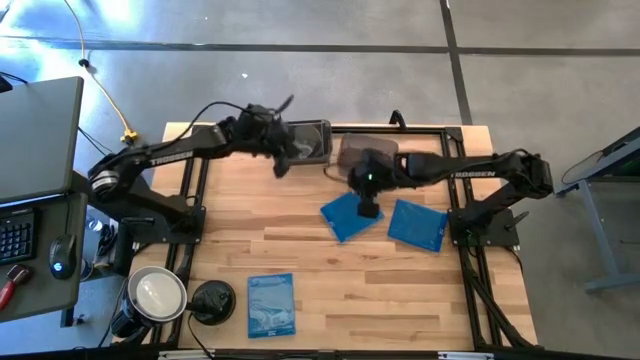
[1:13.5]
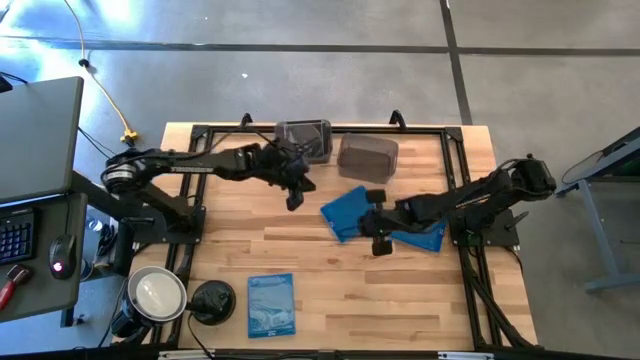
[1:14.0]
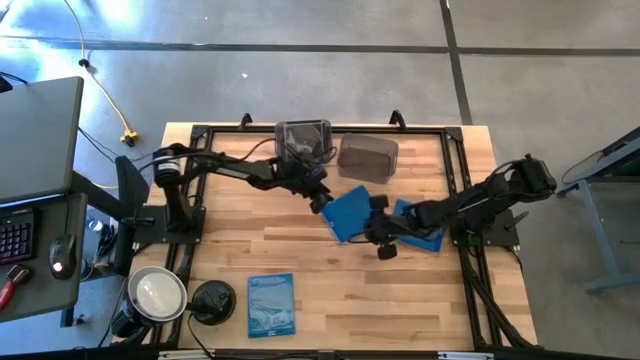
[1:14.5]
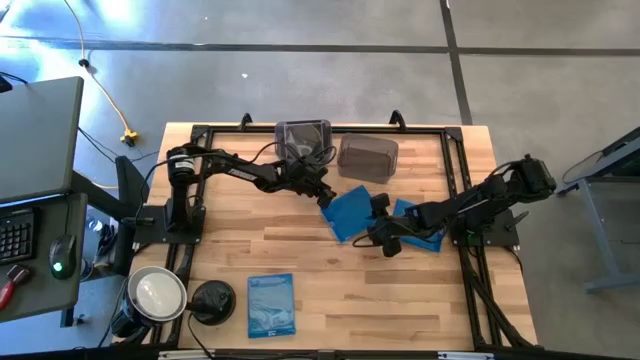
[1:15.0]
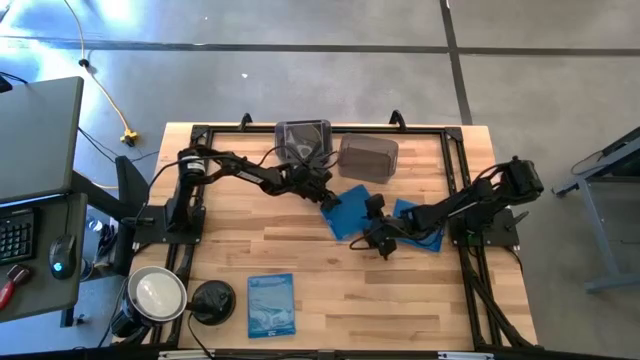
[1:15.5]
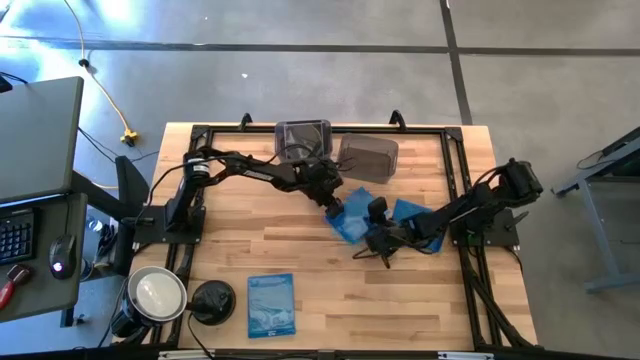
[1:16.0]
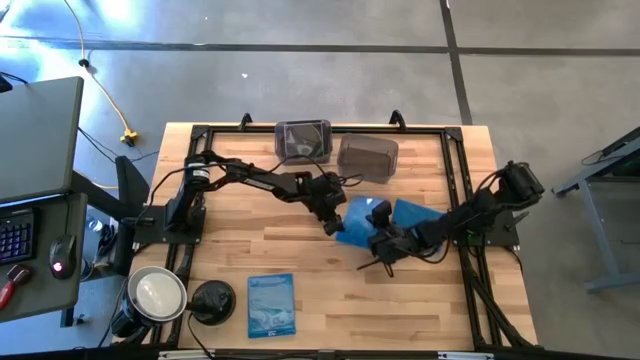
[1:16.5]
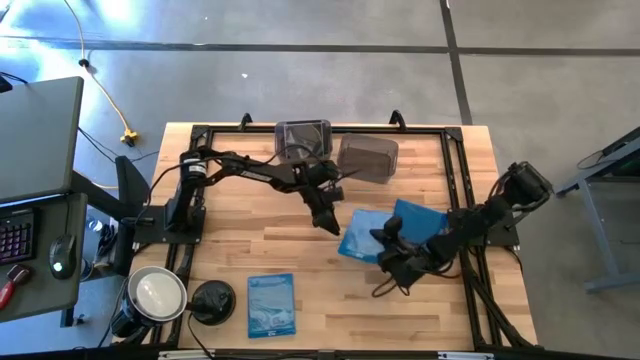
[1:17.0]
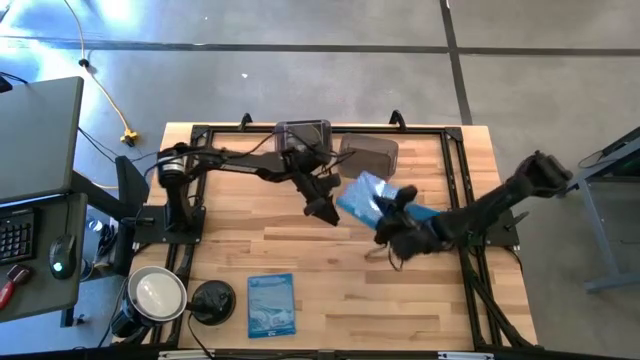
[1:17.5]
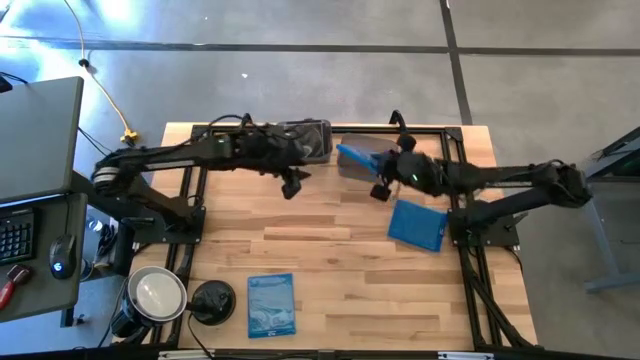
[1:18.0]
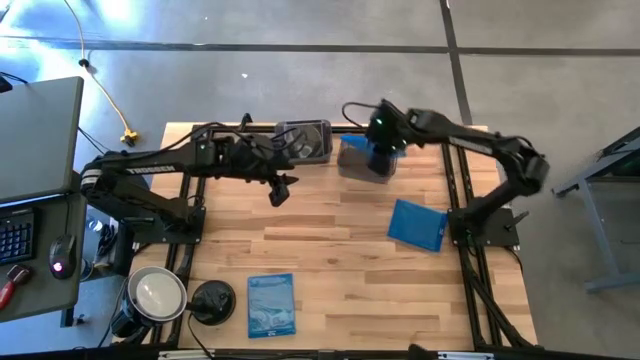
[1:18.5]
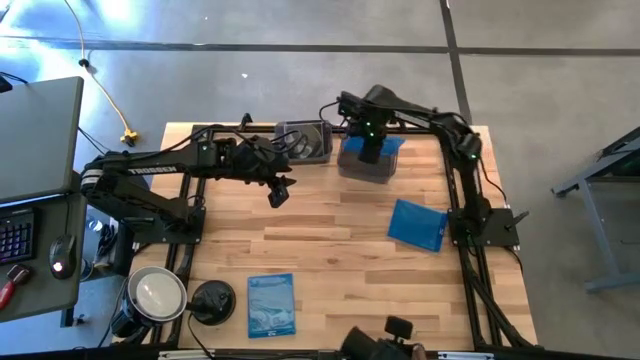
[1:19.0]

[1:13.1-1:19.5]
Task: Pick & place jewel cases by type
Put the top left blue cd case into the right black bin

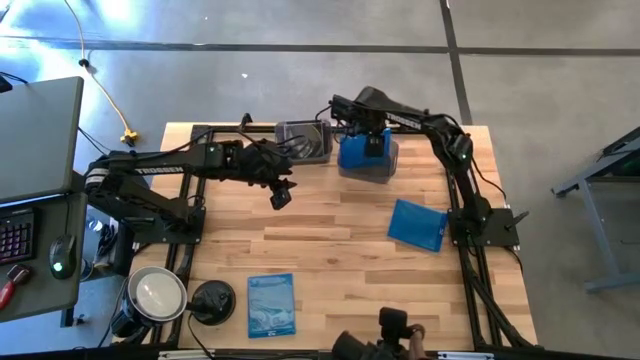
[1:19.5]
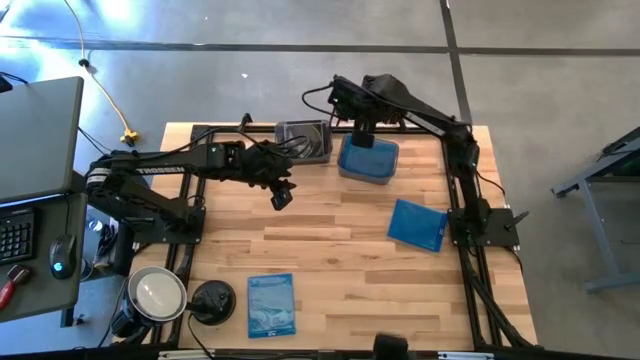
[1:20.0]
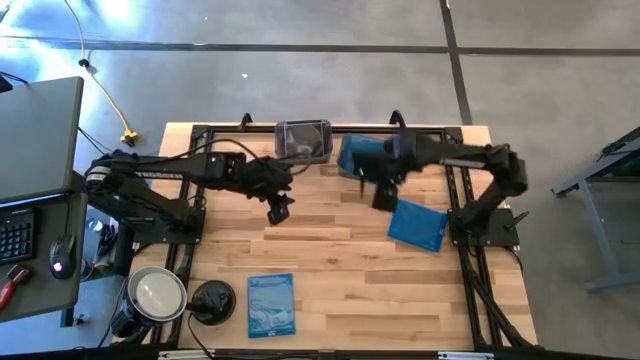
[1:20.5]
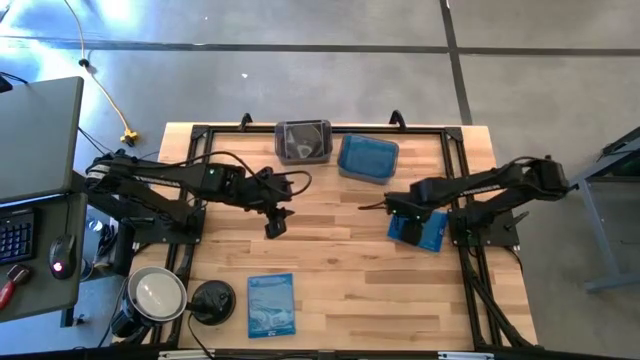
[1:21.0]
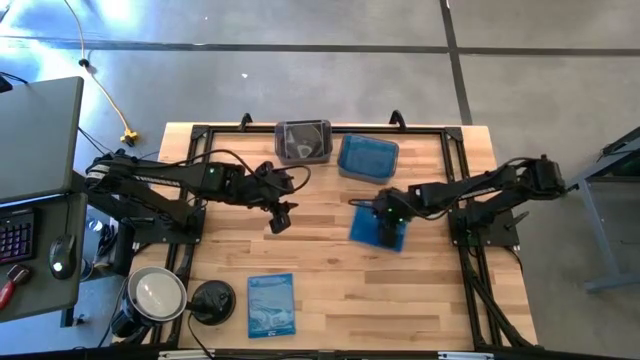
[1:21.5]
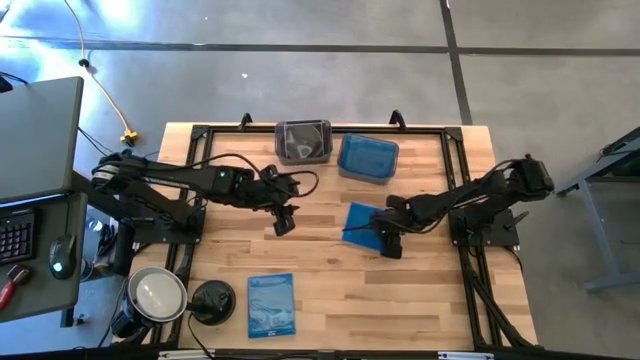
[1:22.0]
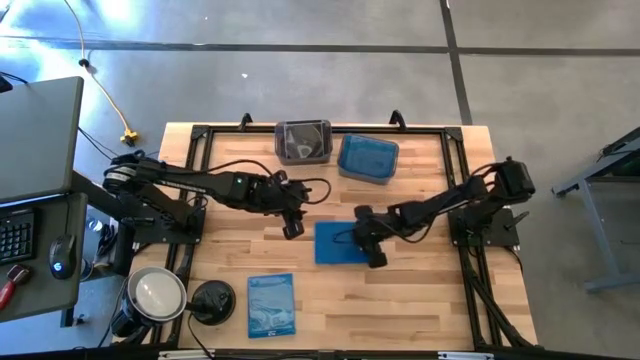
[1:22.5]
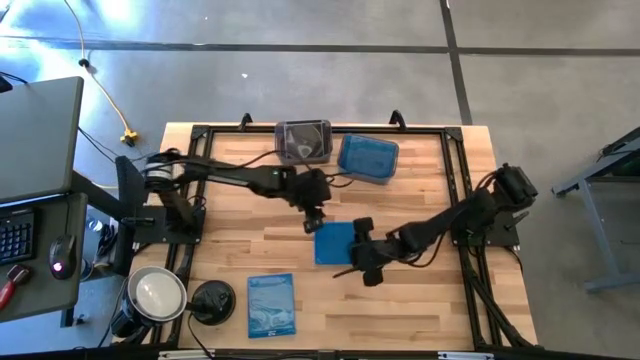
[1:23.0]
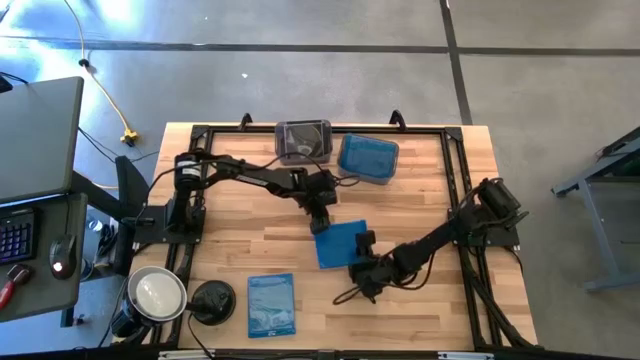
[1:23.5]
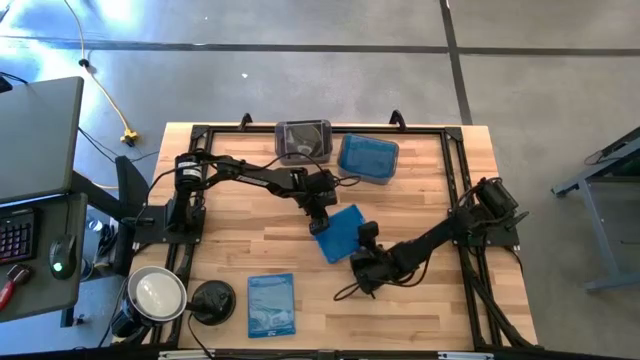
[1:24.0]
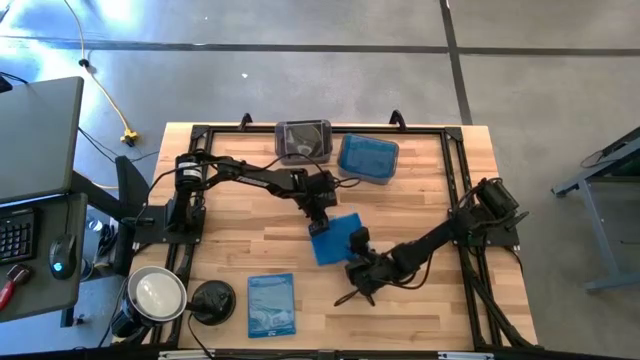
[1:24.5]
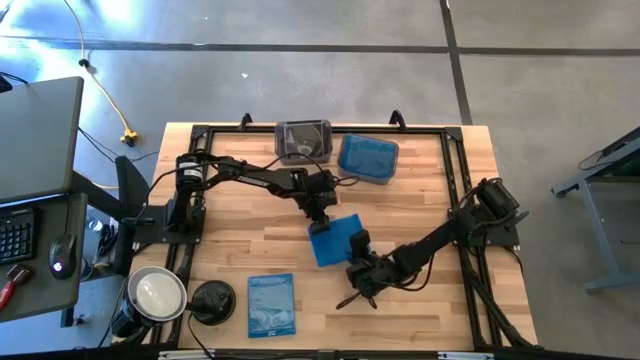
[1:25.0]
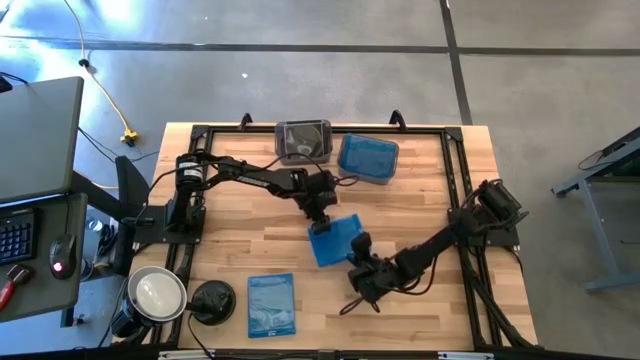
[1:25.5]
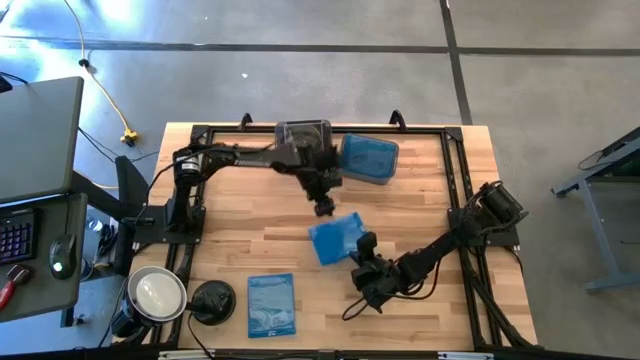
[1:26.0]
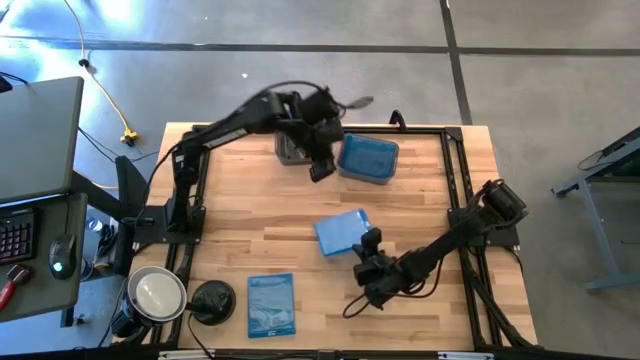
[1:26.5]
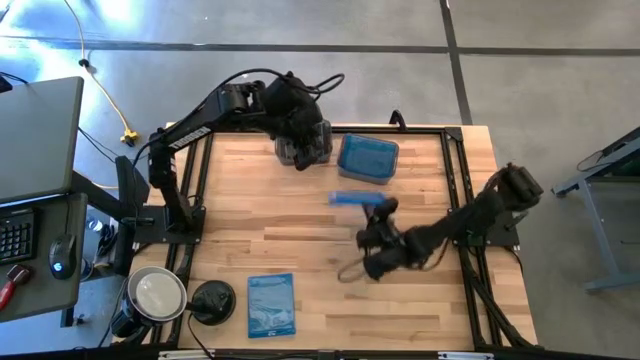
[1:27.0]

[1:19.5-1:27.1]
Put the top blue cd case into the right black bin

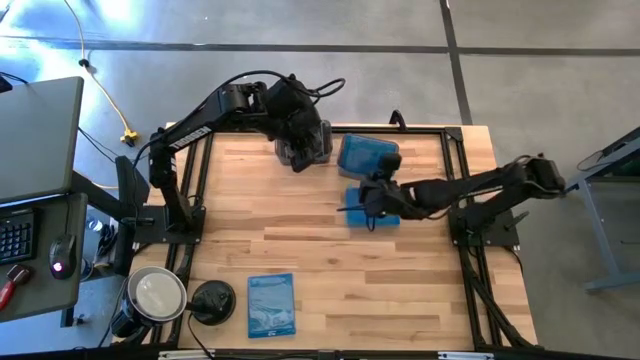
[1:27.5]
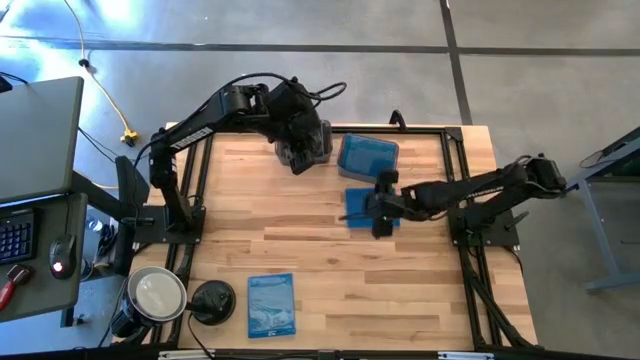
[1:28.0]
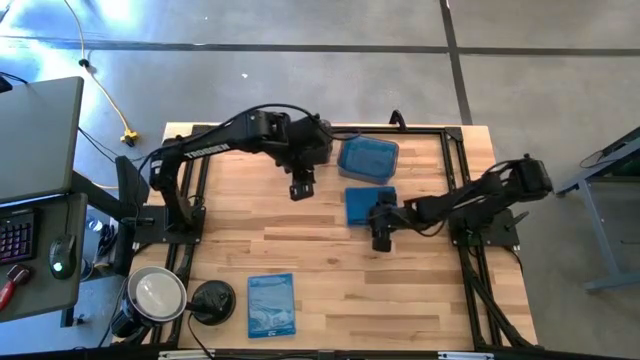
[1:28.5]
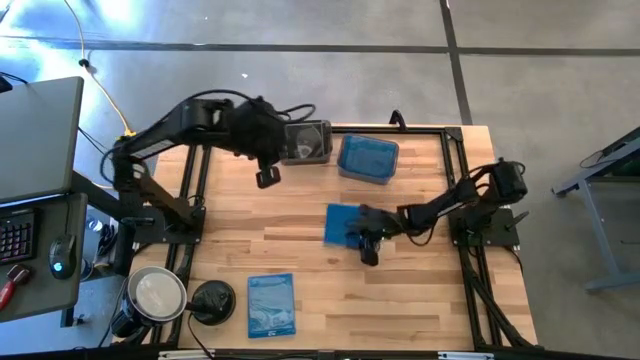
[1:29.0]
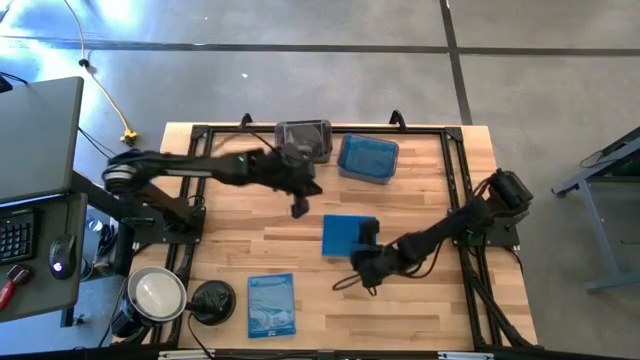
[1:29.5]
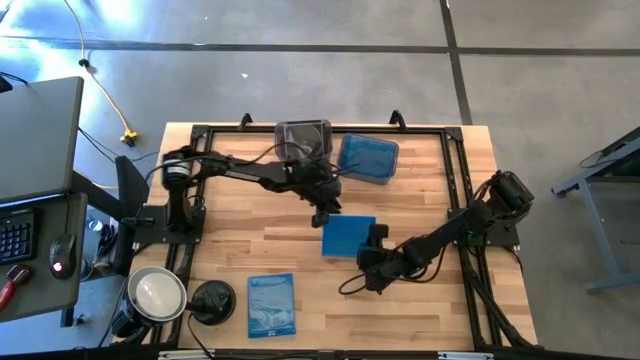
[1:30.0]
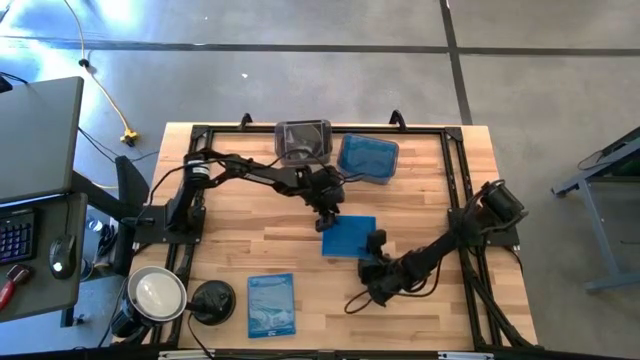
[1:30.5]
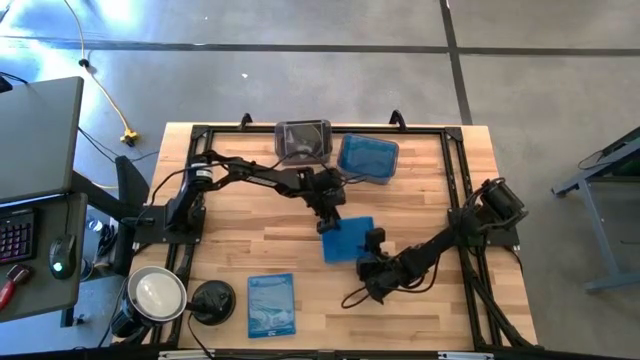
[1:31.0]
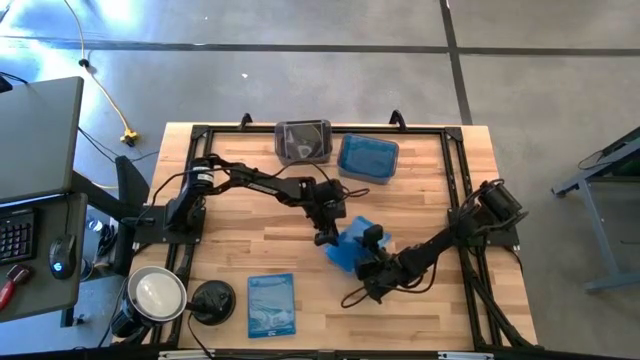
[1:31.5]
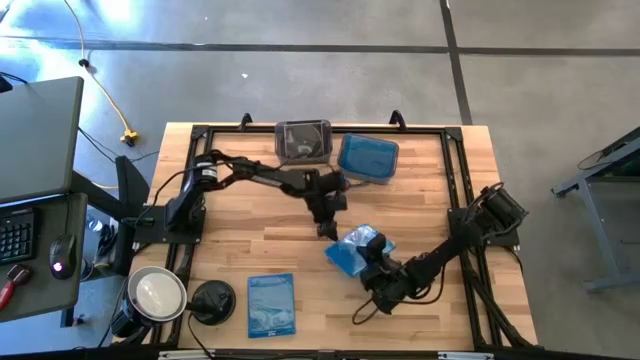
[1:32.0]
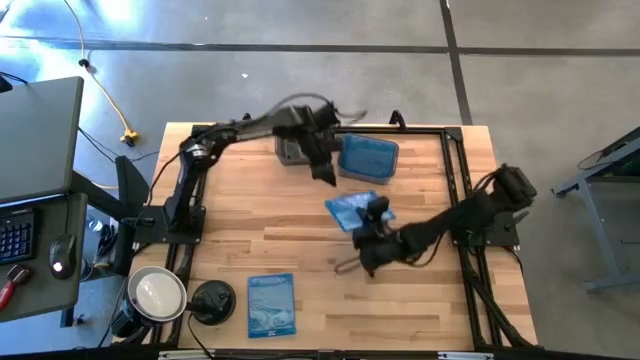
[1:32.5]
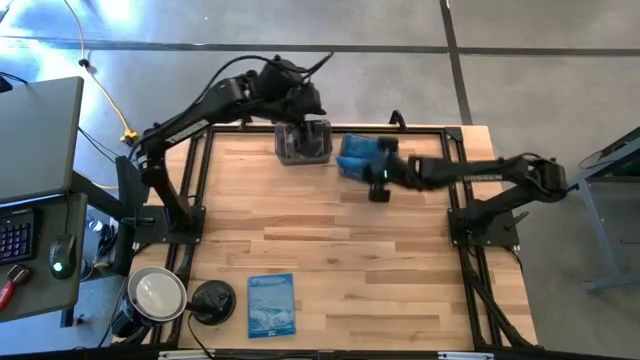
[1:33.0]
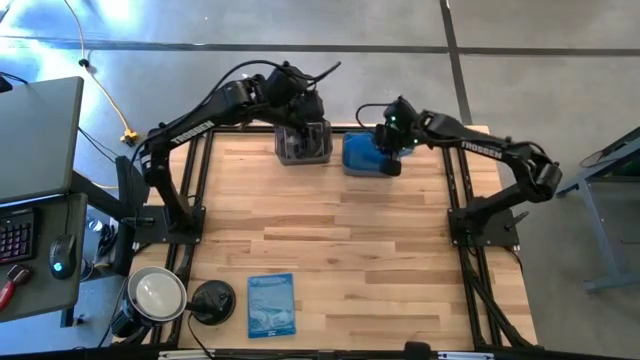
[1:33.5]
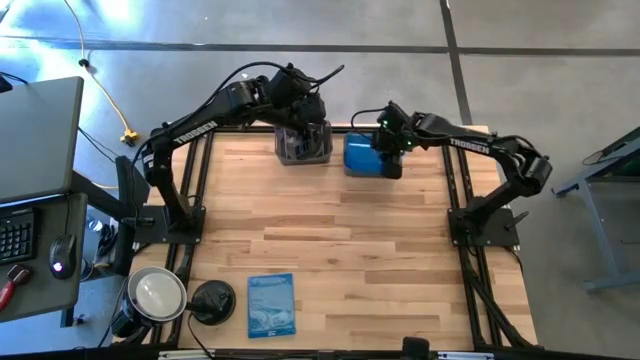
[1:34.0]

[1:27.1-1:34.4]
Put the top blue cd case into the right black bin
